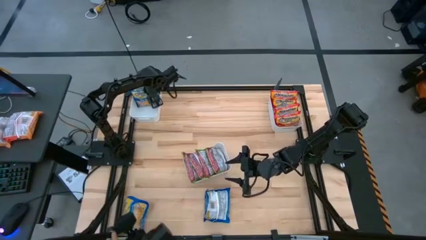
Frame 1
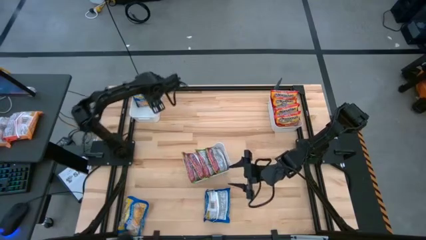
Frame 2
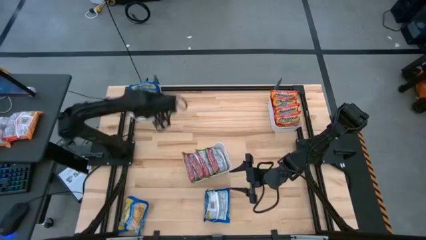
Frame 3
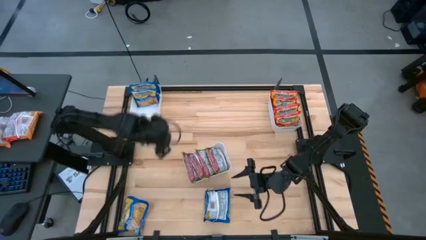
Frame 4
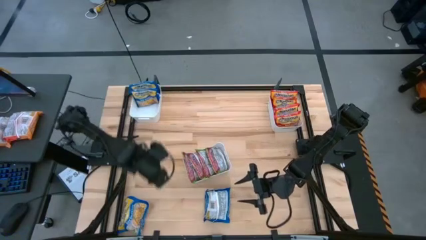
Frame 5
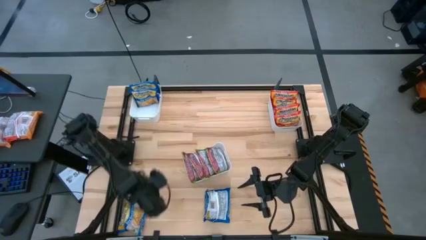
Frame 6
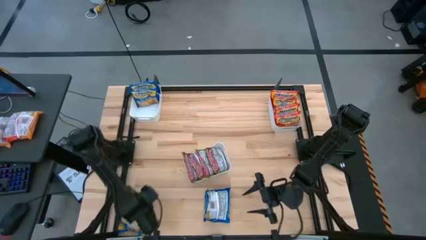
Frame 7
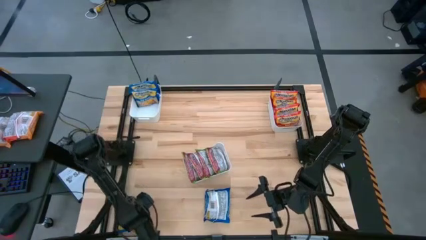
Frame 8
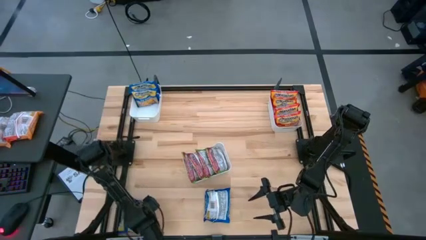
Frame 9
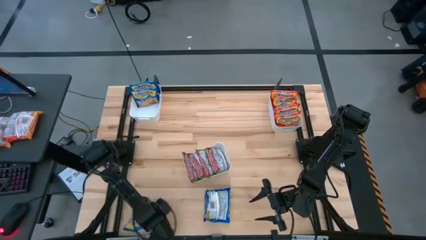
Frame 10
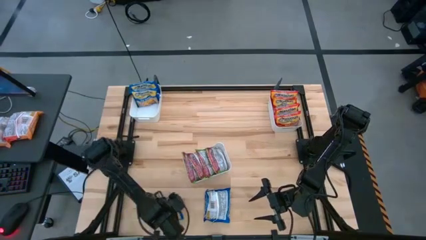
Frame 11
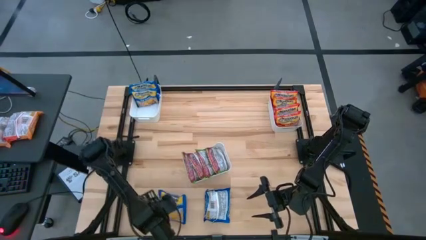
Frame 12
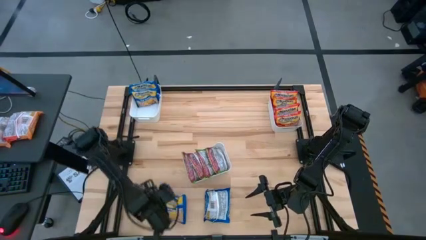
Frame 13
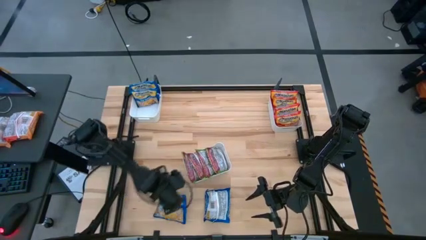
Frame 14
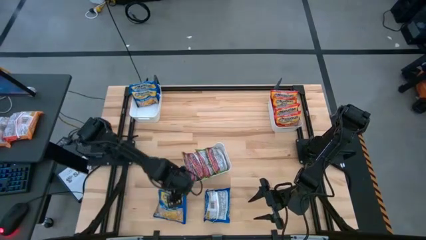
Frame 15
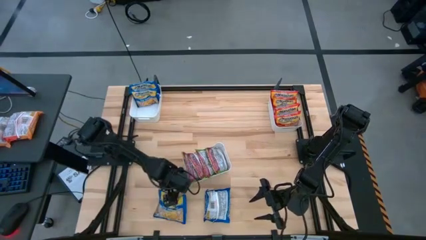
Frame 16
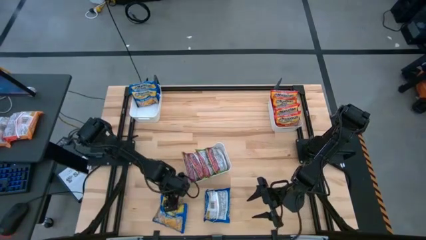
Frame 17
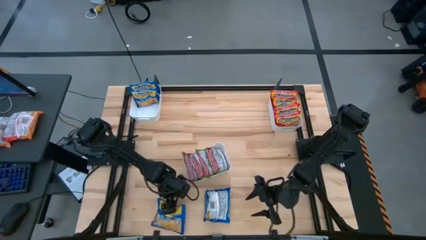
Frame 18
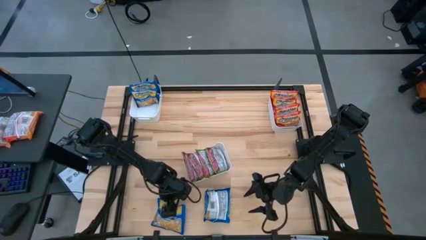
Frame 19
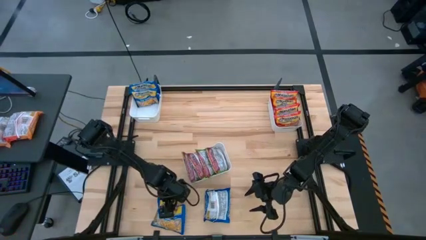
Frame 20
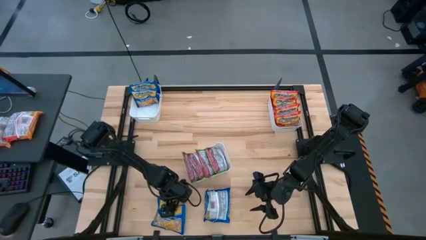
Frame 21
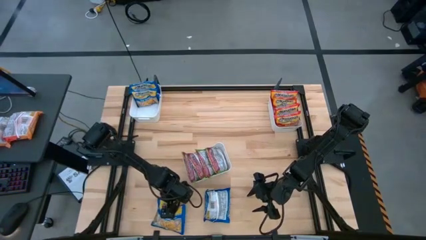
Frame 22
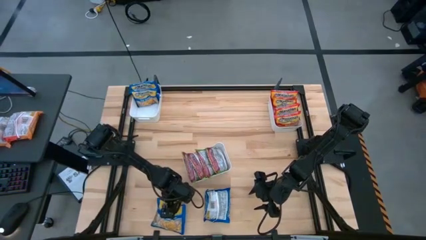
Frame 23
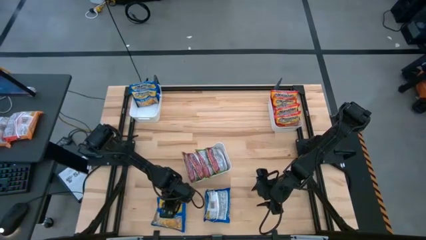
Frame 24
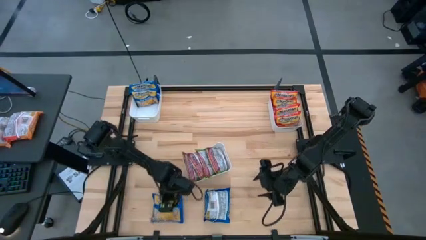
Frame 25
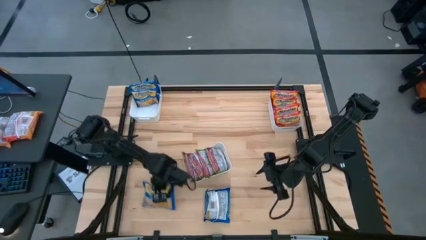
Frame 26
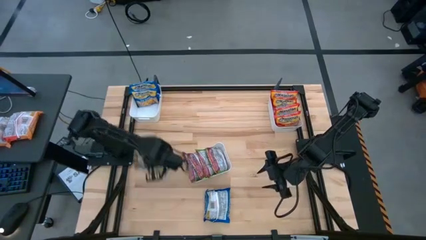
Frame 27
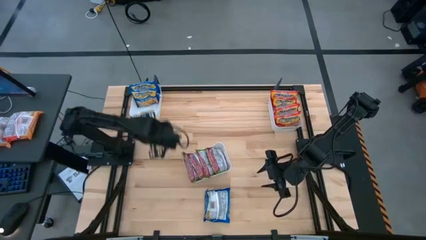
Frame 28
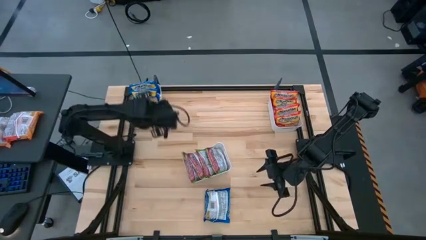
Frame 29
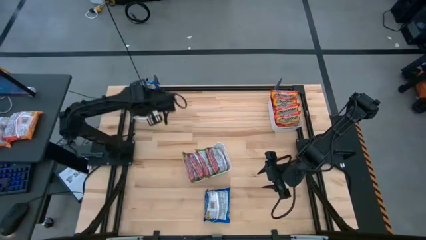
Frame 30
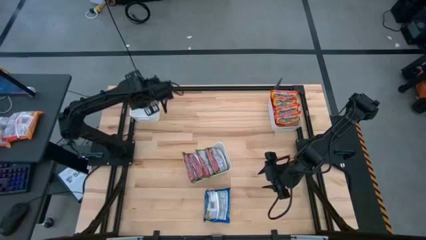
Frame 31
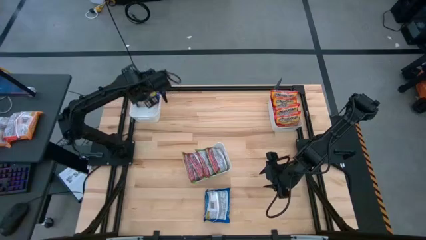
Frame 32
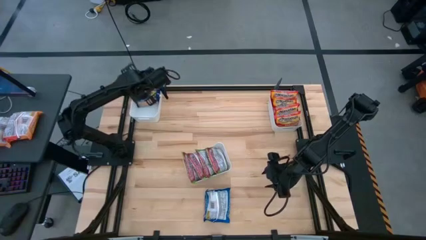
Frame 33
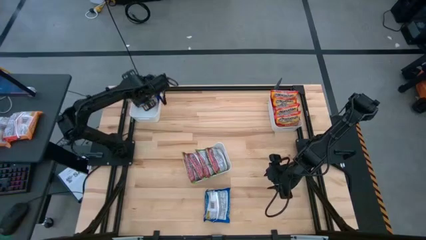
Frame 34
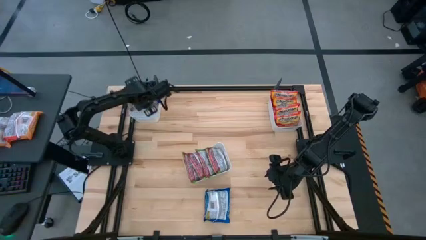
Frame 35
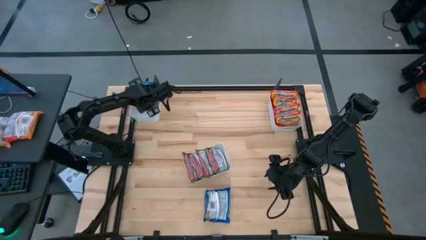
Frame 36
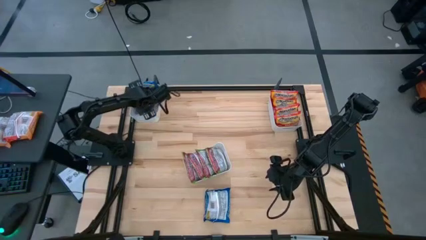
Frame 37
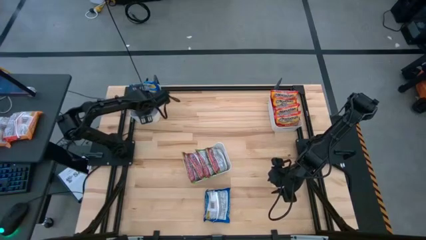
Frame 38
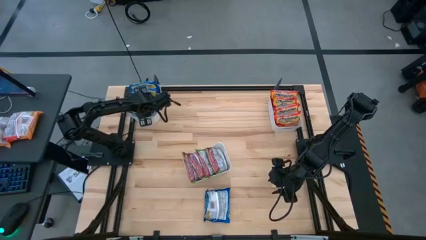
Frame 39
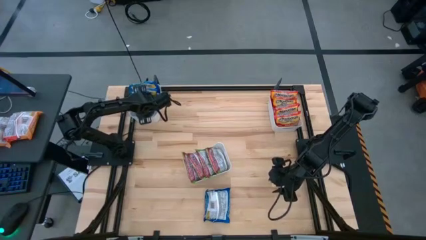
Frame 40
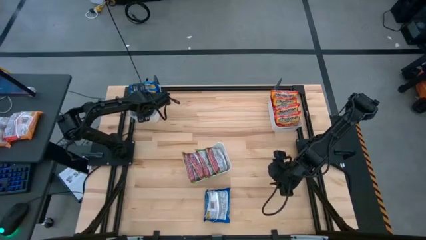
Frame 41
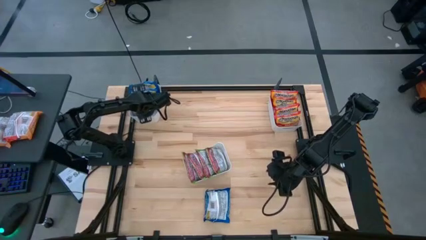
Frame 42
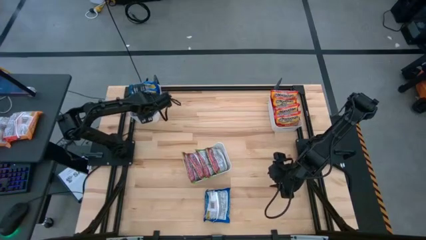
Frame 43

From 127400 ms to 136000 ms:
Task: Sort Maruchan noodles
Put the blue noodle pack into the top left white bin

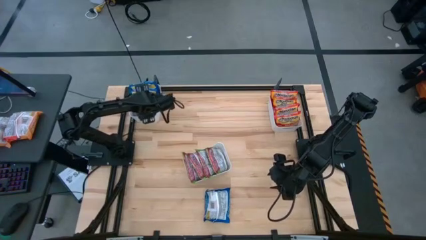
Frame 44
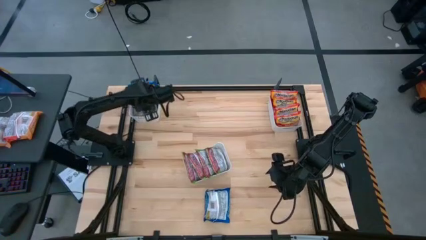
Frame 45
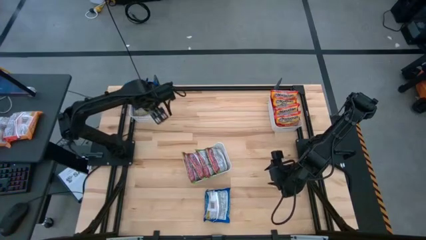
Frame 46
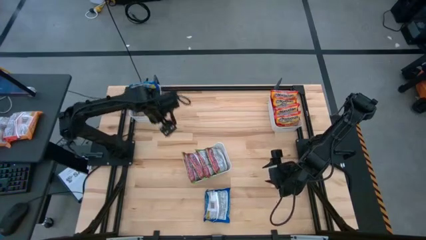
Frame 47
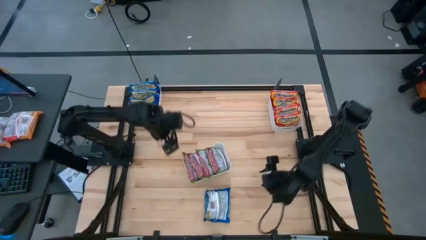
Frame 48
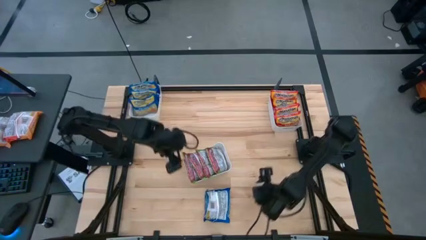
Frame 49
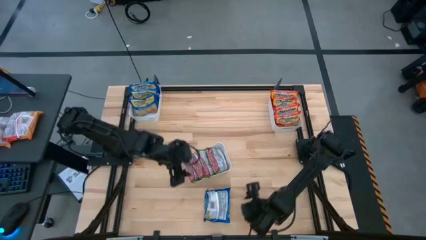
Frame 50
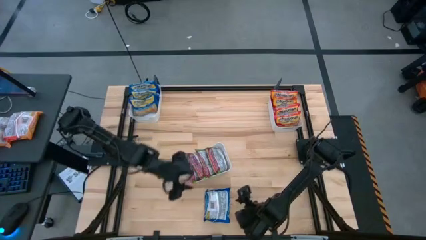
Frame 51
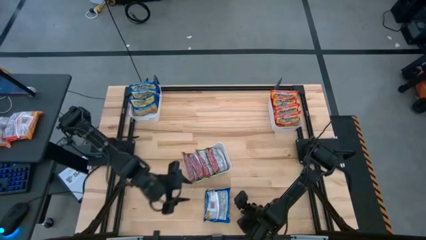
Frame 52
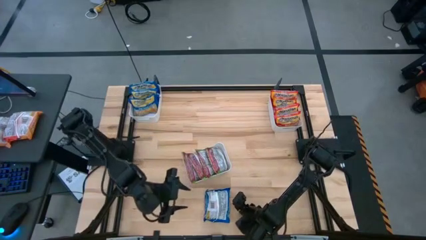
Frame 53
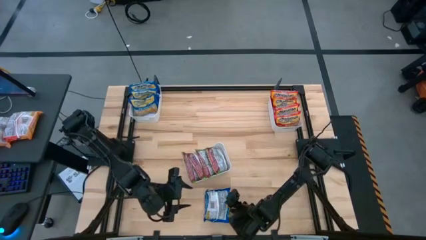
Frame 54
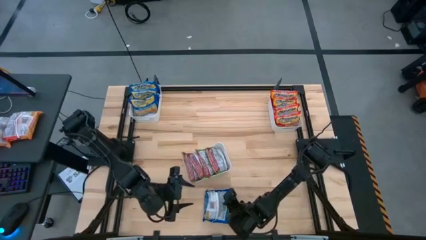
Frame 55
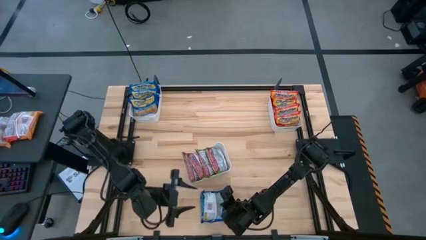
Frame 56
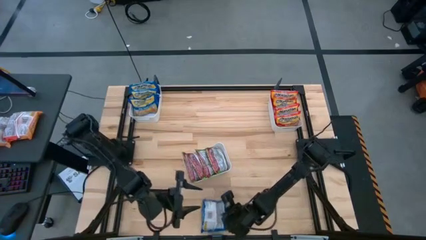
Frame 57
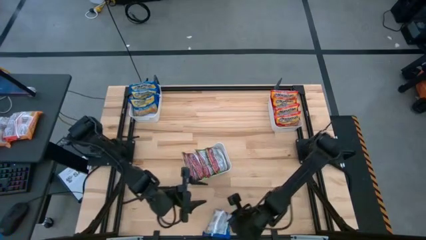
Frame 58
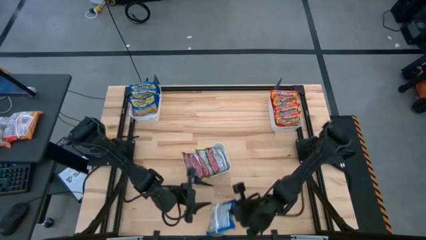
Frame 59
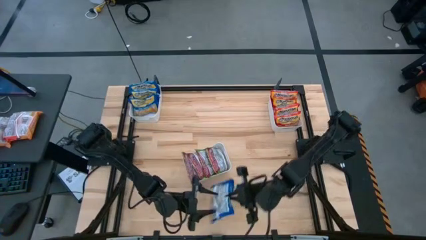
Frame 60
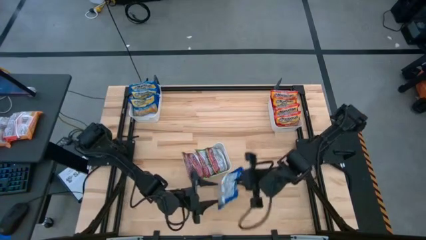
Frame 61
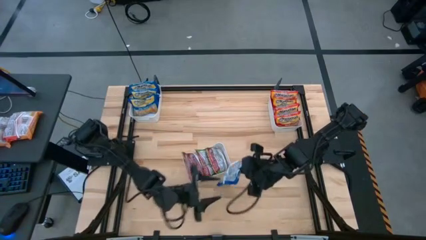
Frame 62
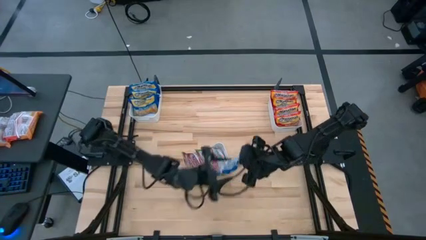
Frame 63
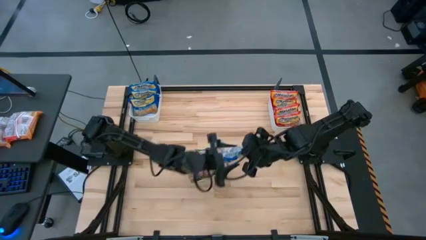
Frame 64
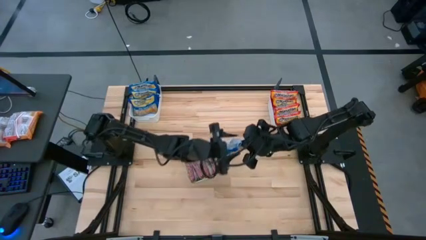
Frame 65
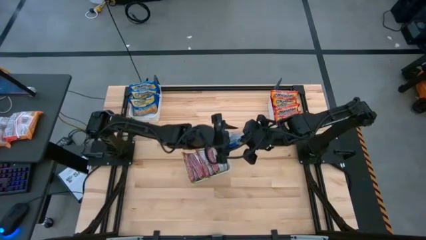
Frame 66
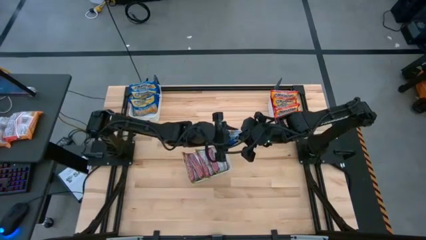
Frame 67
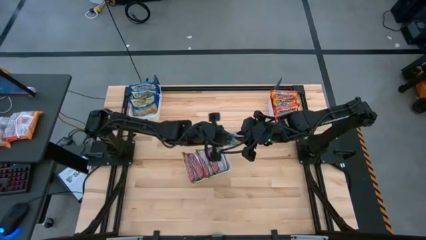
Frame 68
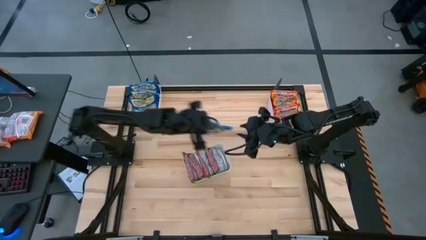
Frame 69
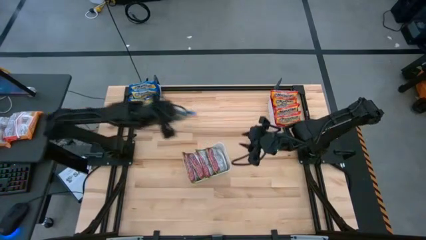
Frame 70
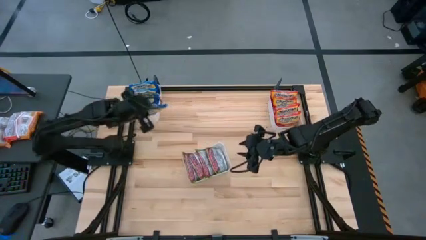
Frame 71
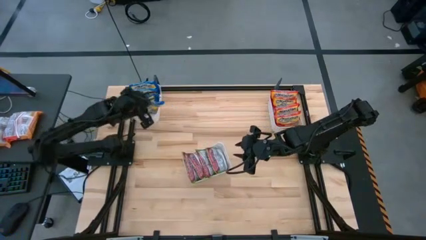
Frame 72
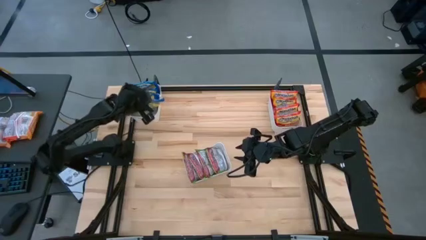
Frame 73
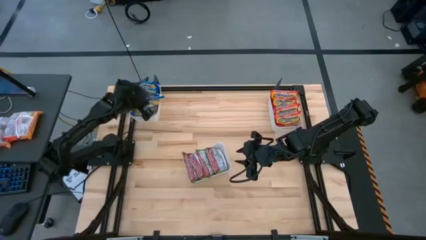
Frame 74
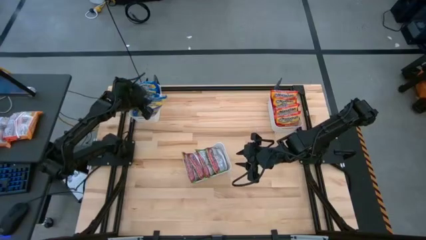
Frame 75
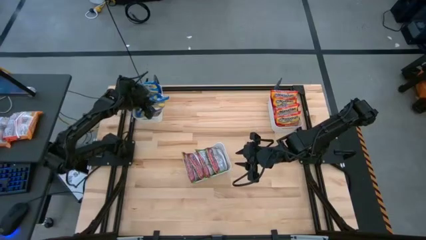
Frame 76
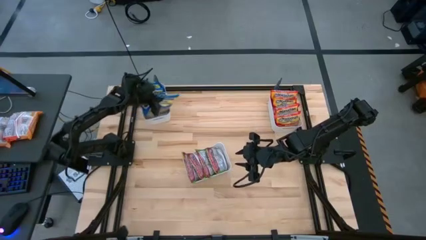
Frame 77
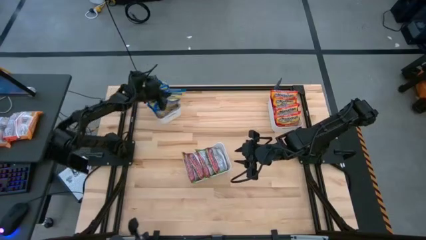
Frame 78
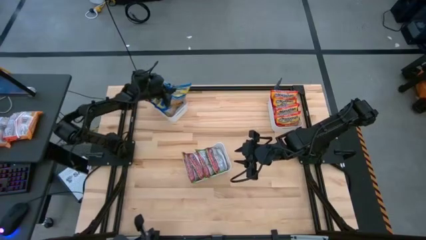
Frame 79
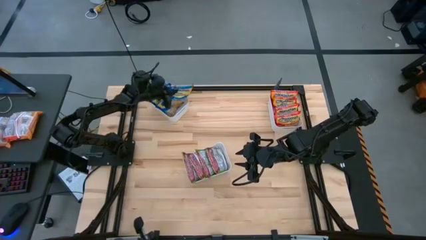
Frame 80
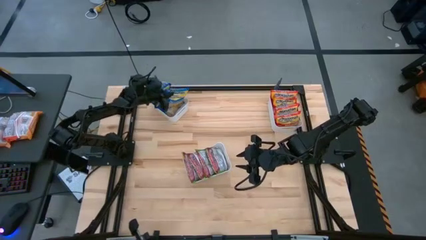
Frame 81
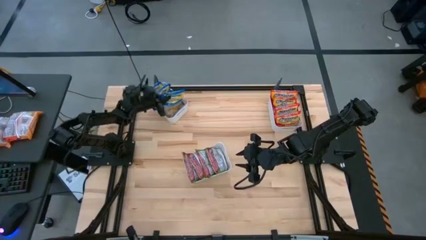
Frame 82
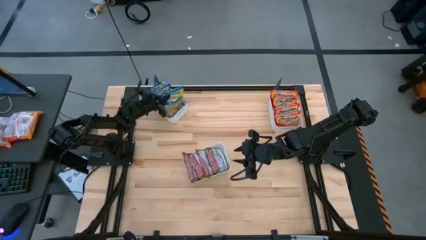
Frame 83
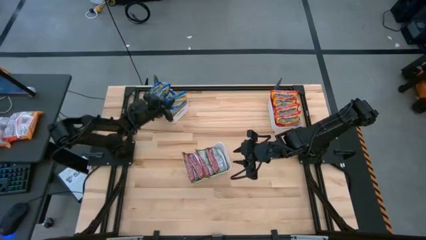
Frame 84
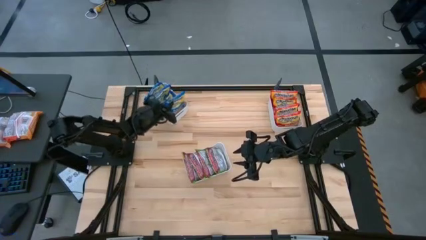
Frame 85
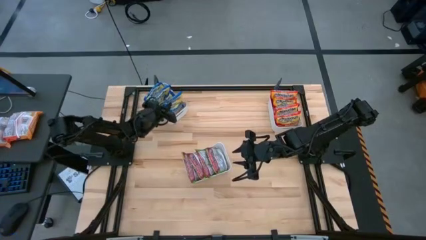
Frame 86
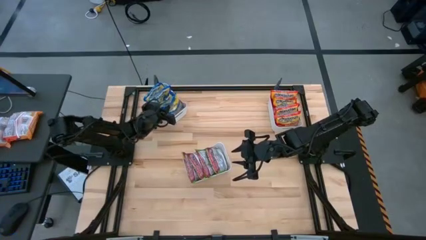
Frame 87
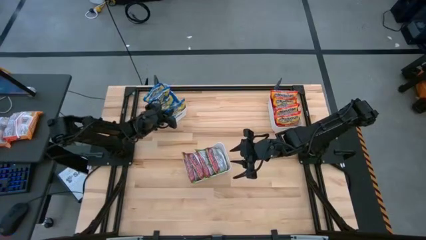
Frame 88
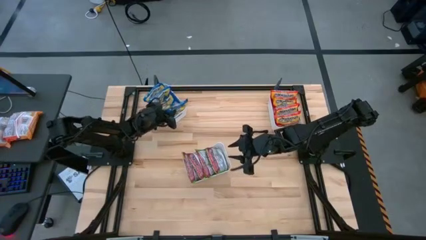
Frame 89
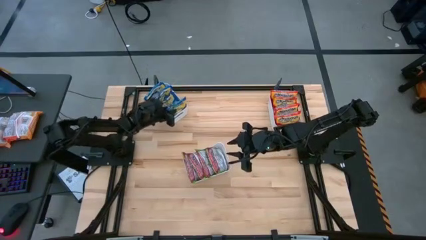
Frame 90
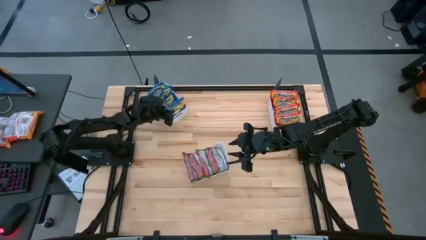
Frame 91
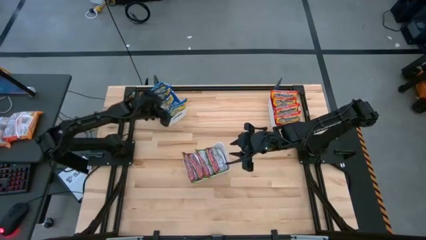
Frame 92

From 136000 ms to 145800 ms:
Put the blue noodle pack into the top left white bin
